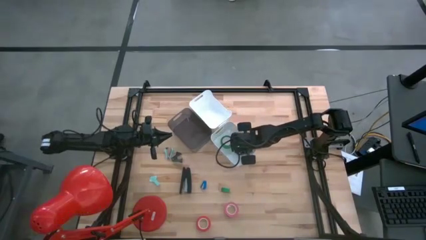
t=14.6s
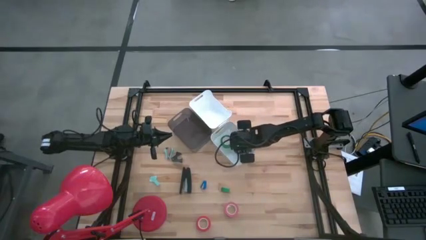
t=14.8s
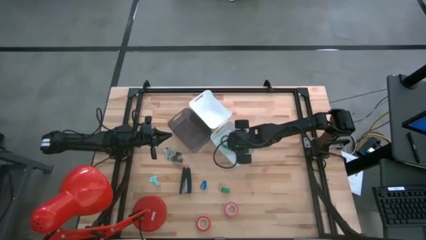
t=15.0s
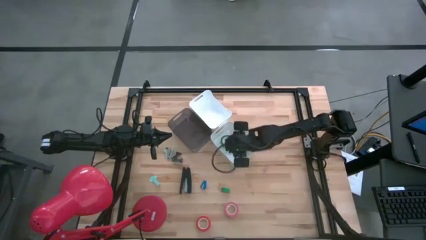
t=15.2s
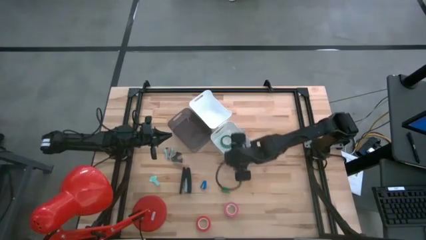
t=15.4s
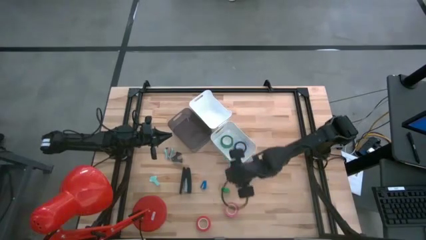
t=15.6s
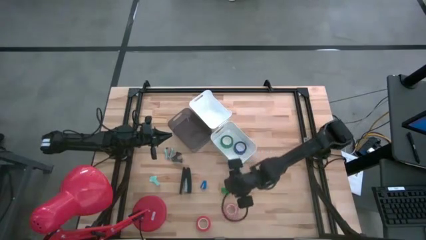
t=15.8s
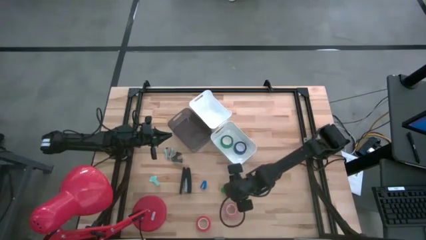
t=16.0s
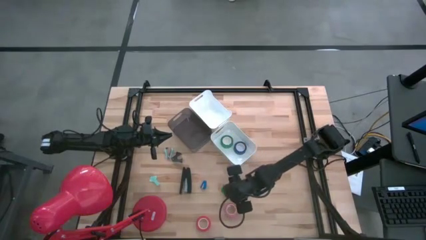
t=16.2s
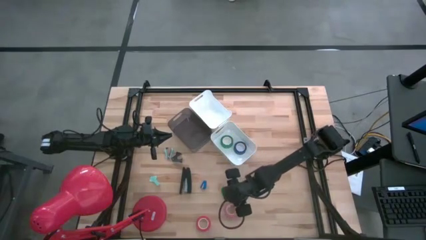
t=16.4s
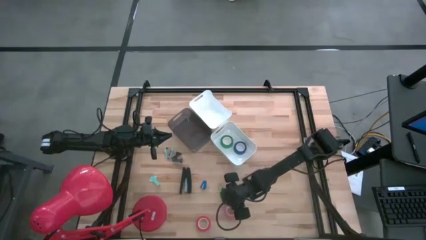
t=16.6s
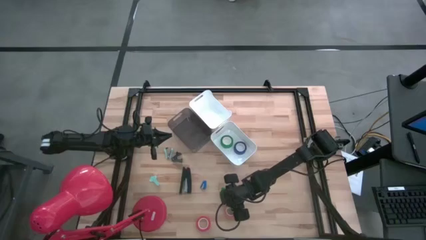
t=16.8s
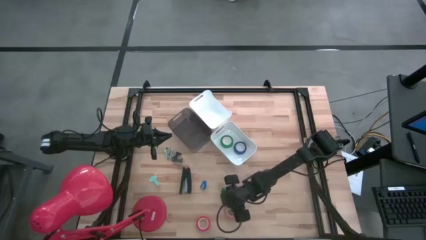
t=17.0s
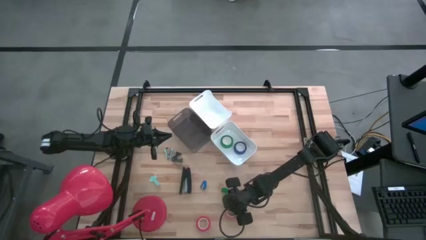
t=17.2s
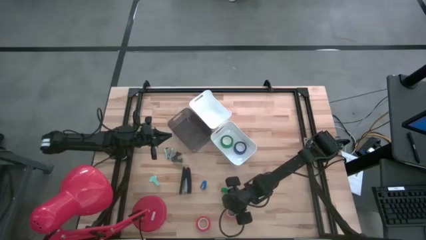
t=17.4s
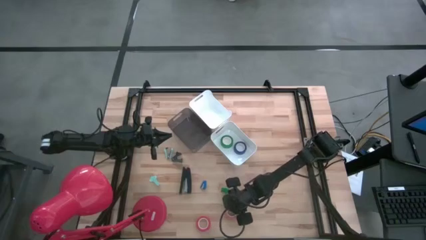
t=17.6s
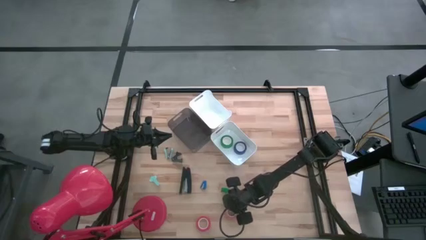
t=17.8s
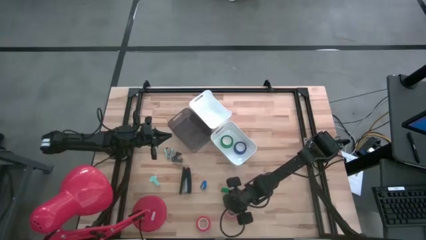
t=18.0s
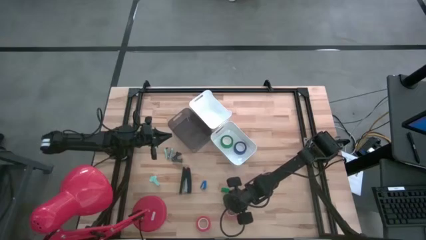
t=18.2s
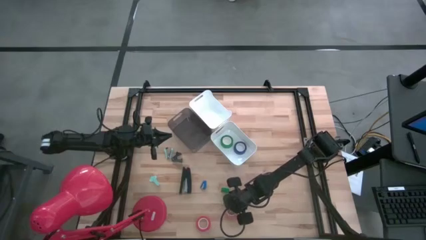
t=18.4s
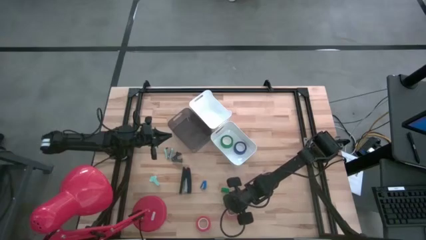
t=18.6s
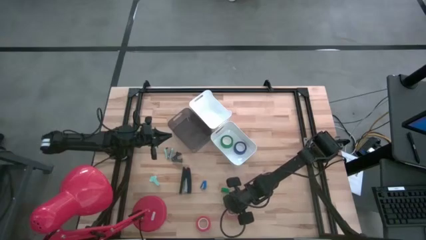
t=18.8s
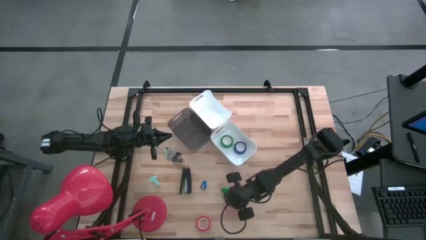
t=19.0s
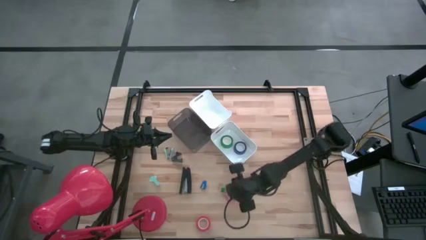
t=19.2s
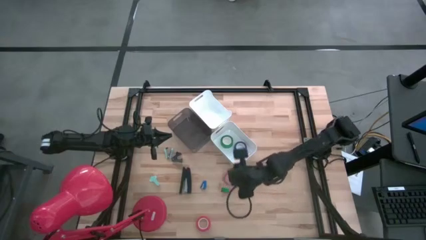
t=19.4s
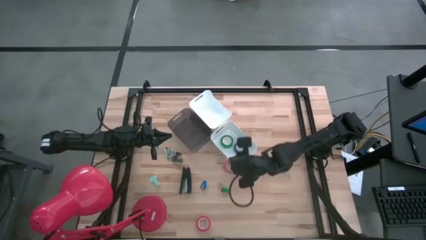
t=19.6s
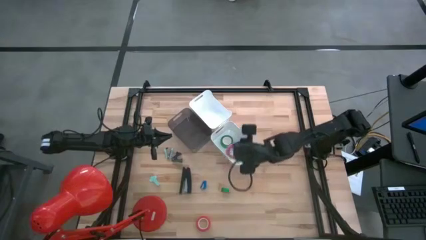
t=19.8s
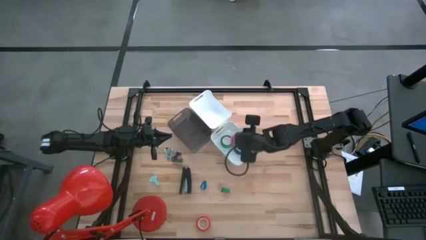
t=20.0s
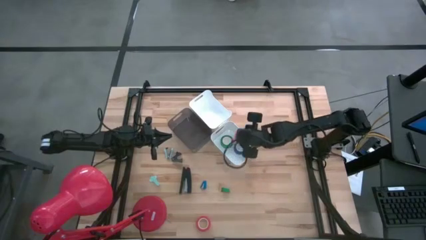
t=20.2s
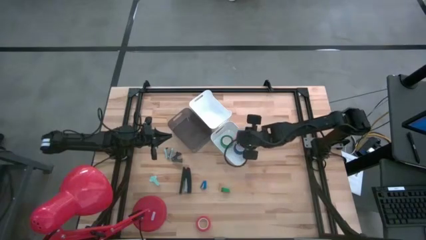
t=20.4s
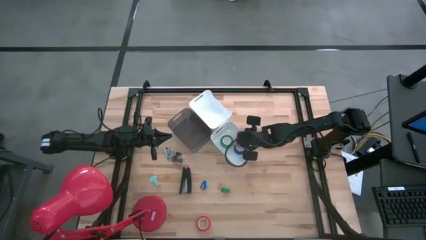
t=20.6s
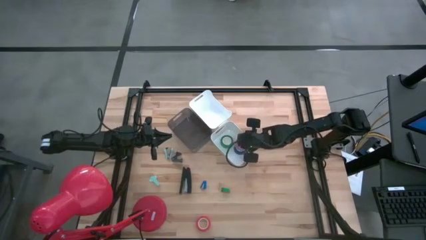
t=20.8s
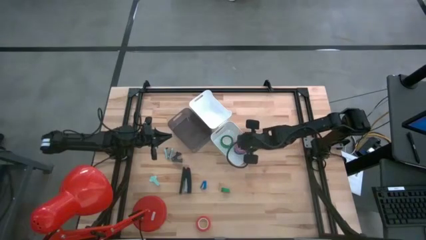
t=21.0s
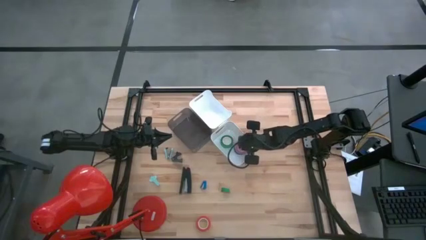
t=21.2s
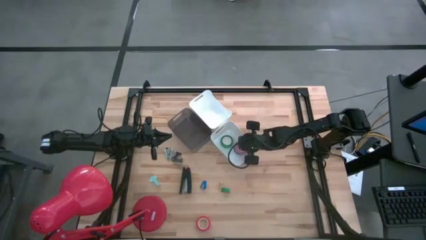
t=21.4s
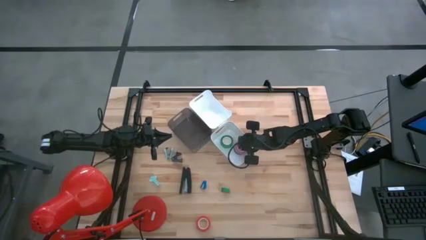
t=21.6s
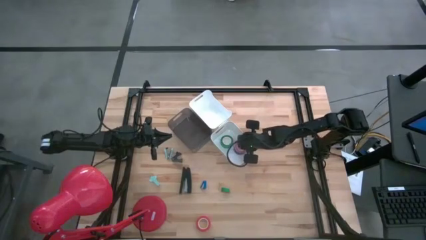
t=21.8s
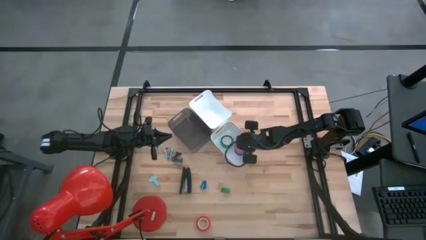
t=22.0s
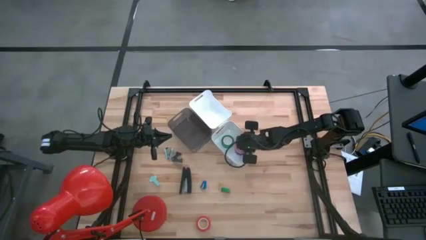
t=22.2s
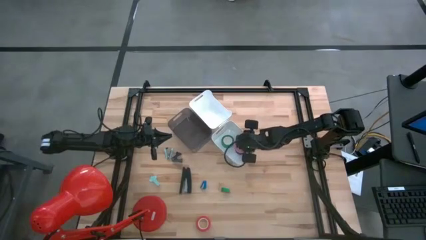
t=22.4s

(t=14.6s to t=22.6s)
Task: Pick and place Stapler, Stapler remover, tape
Put the pink tape into the bottom white bin

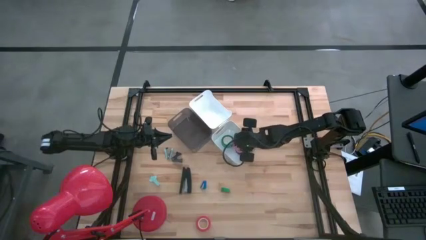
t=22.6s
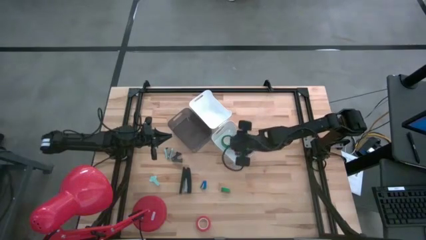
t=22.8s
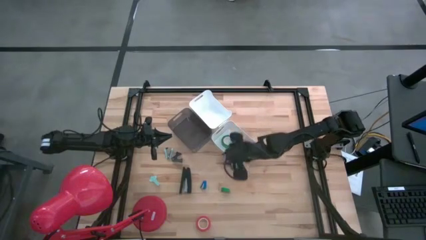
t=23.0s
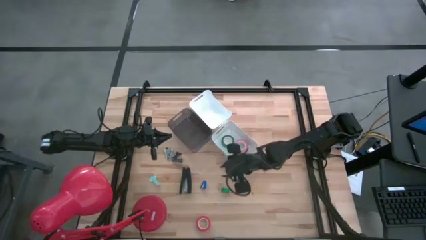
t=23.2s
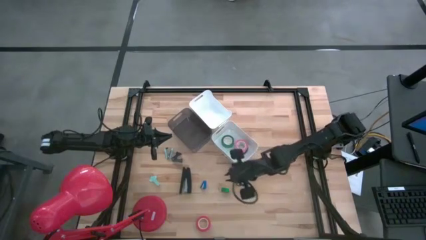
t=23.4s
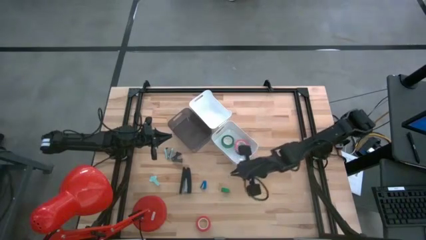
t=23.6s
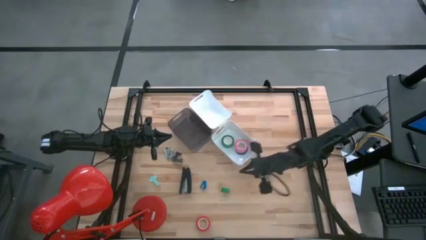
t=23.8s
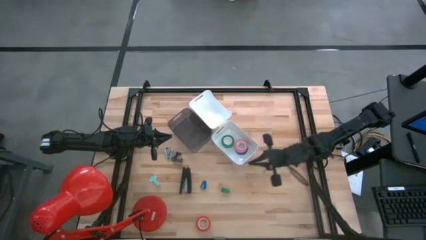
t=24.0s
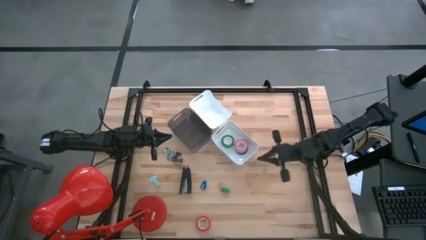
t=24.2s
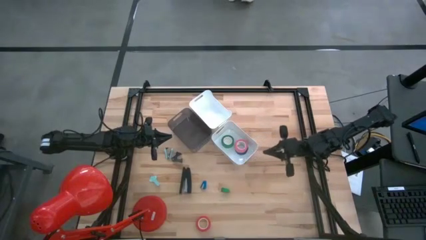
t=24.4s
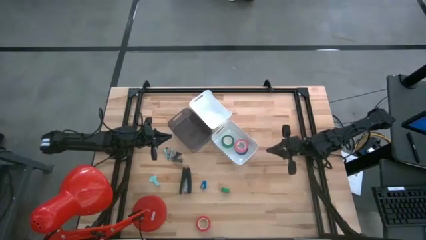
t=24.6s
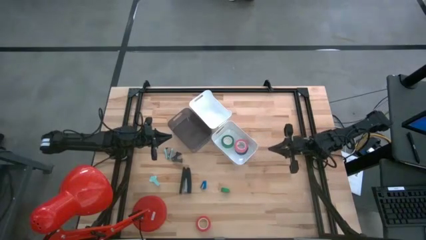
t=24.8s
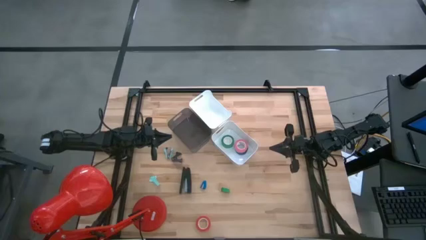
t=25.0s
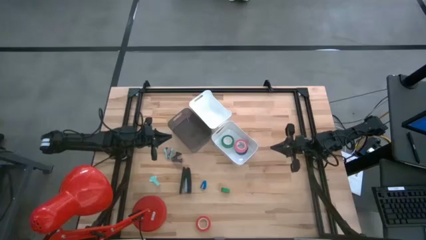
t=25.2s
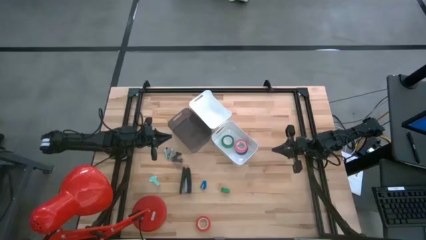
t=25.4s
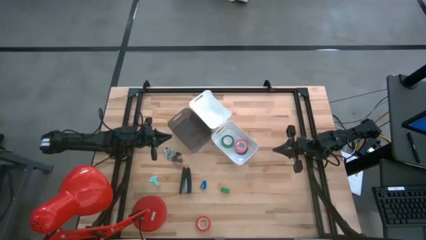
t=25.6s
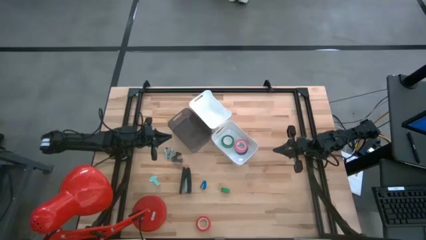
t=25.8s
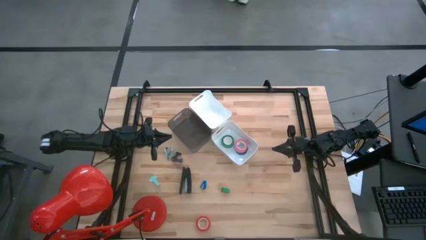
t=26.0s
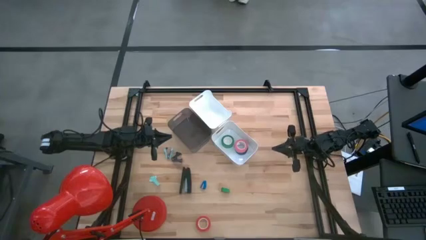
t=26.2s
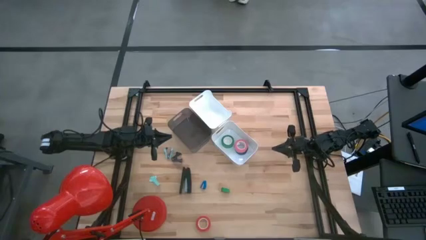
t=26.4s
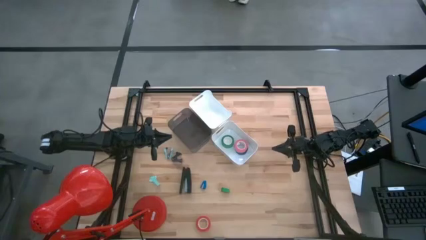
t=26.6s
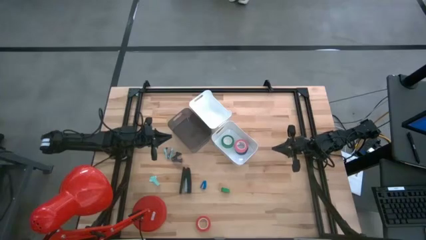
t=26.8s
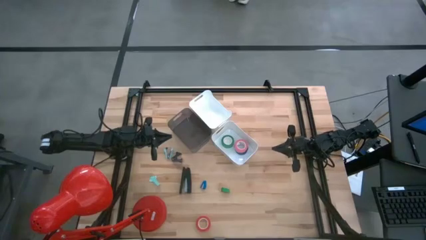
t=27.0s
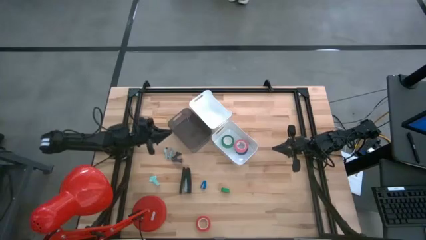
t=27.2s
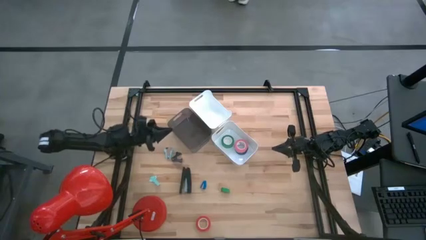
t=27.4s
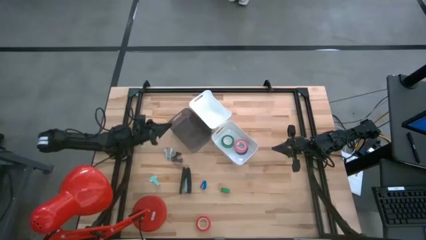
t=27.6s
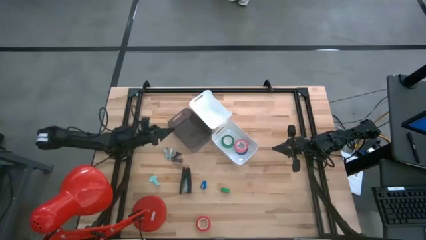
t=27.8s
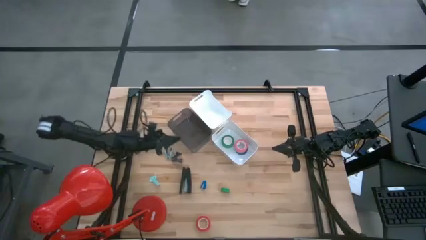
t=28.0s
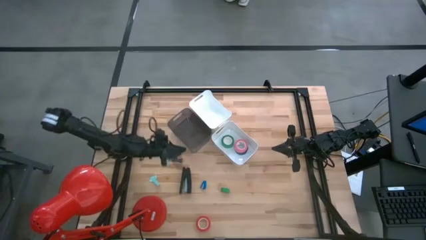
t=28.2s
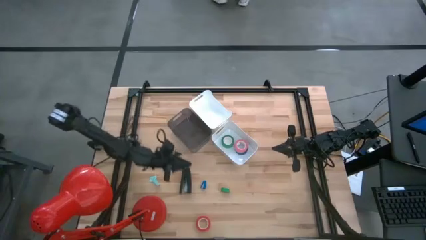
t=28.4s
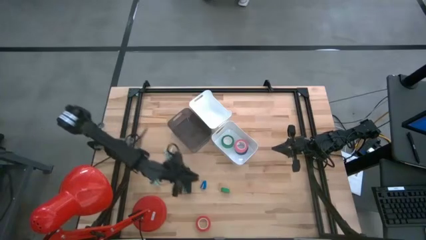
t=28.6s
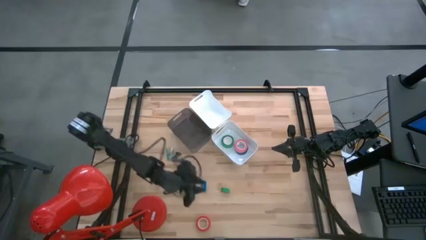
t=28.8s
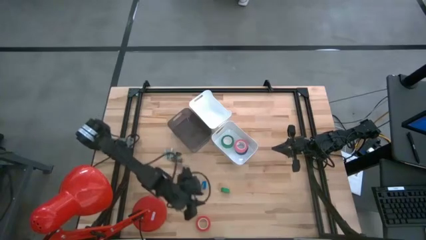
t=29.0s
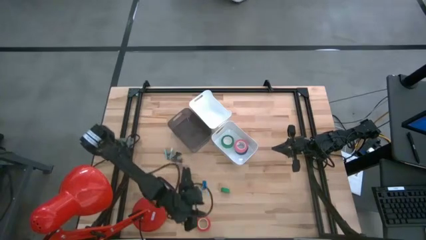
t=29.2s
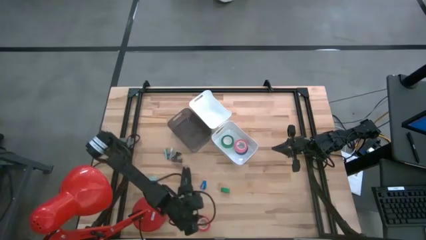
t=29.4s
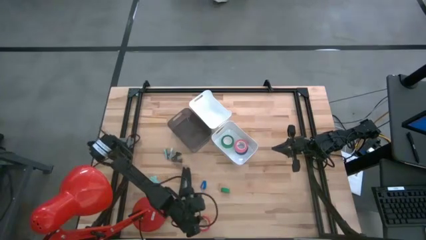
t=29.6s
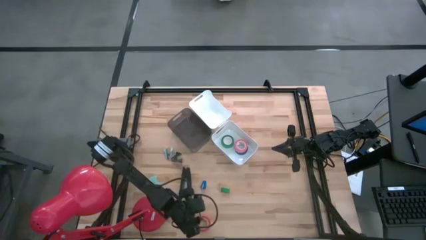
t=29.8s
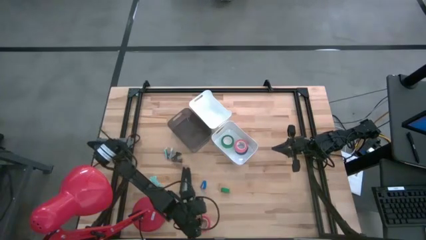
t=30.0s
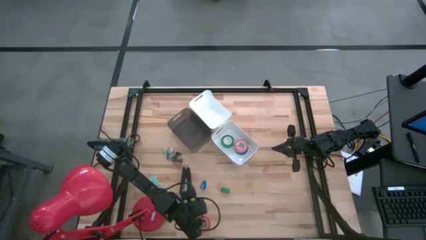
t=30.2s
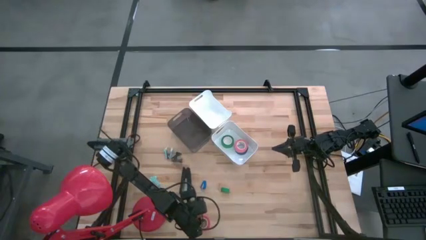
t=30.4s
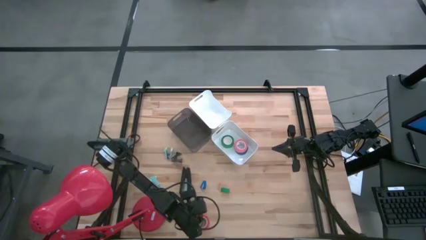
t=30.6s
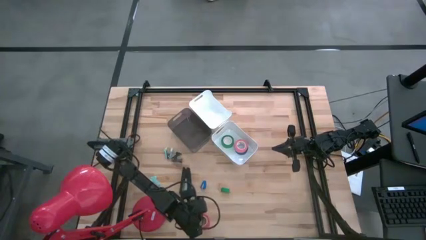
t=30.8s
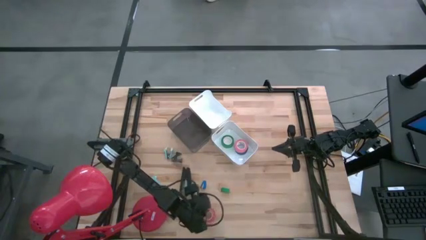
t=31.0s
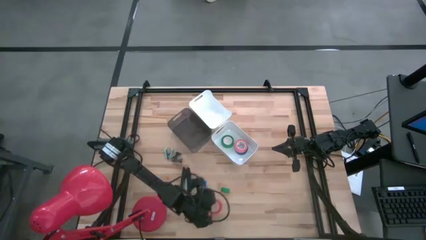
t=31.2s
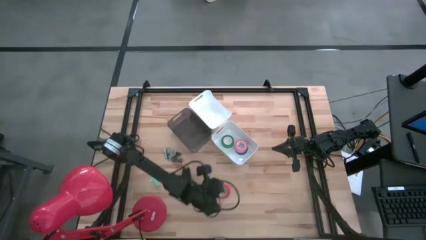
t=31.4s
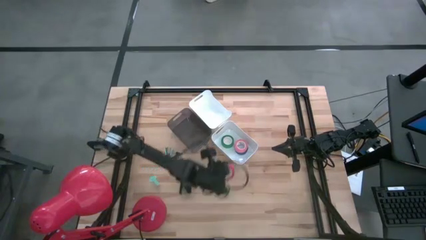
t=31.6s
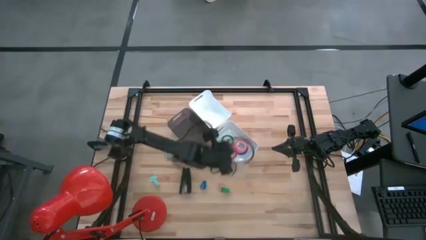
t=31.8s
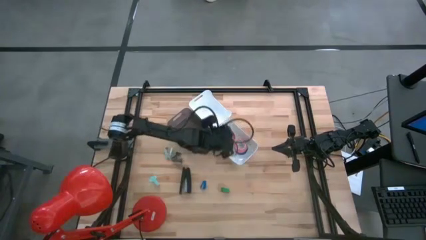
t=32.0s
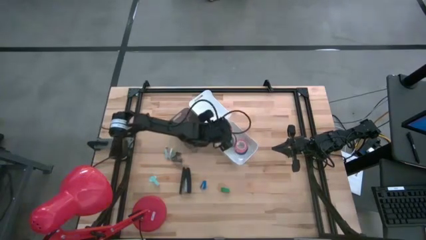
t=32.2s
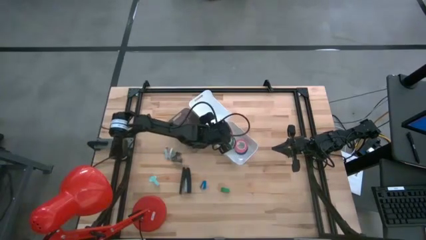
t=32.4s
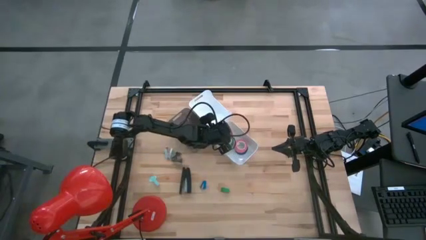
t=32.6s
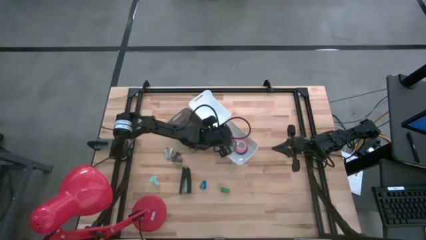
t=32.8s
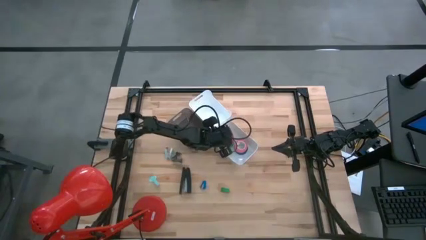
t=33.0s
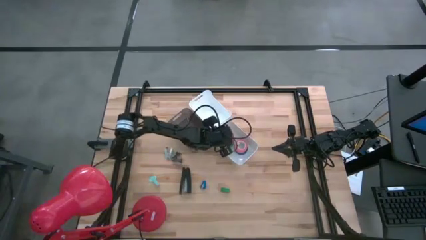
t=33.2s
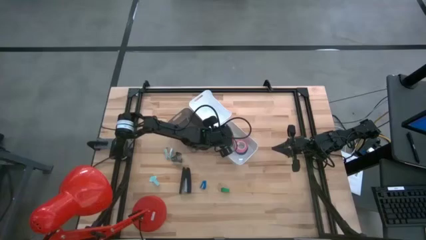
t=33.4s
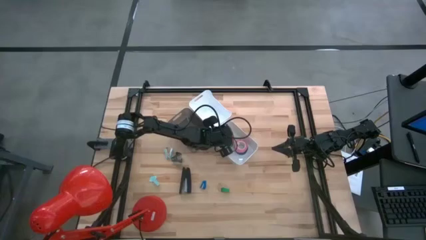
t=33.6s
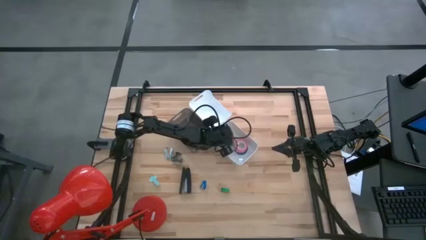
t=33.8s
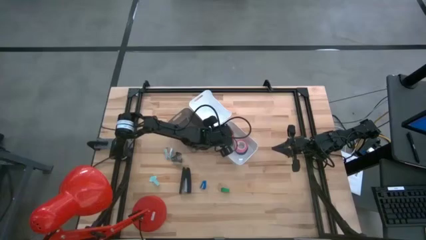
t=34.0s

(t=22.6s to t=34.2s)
Put the orange tape into the bottom white bin
